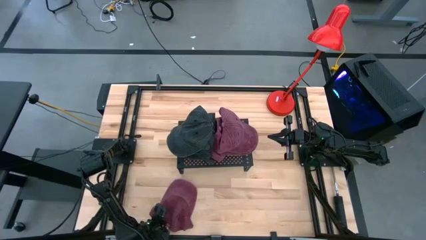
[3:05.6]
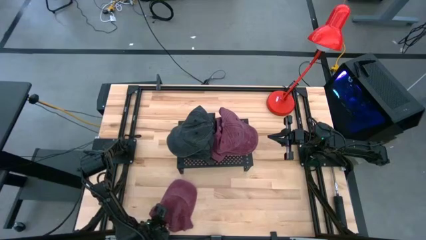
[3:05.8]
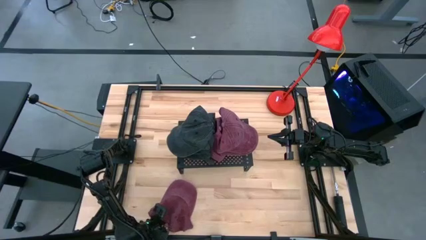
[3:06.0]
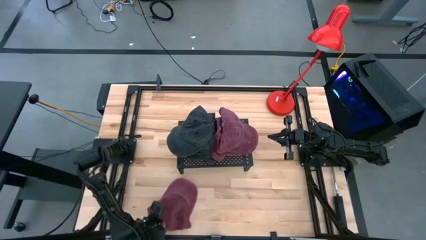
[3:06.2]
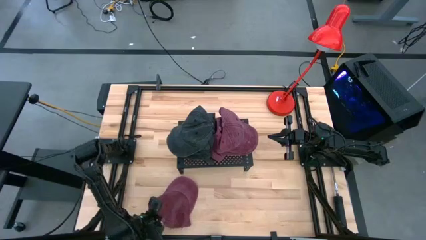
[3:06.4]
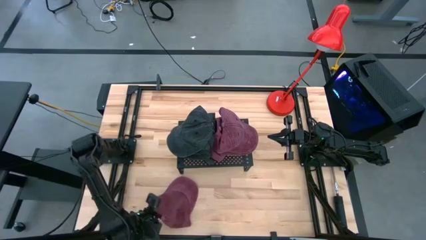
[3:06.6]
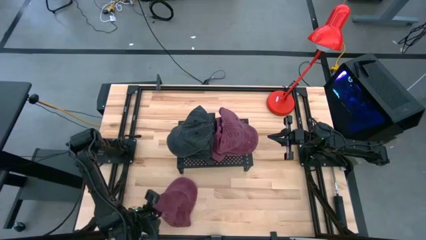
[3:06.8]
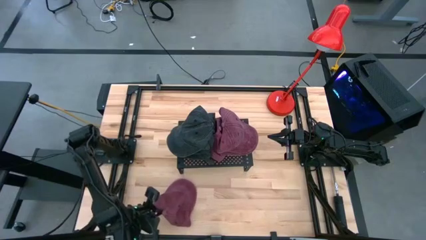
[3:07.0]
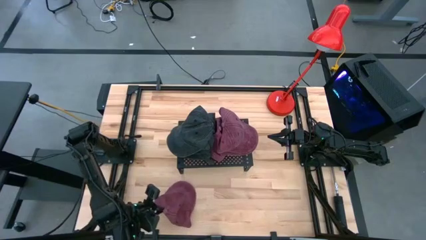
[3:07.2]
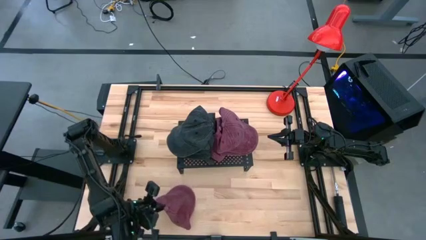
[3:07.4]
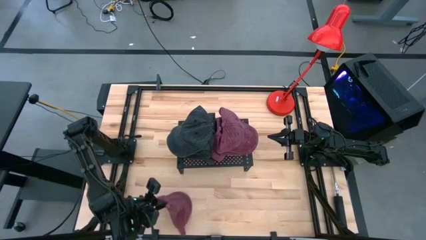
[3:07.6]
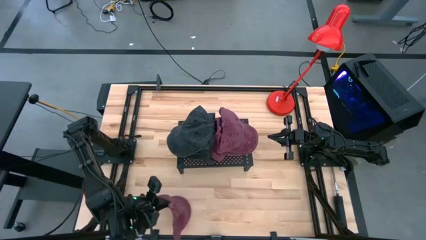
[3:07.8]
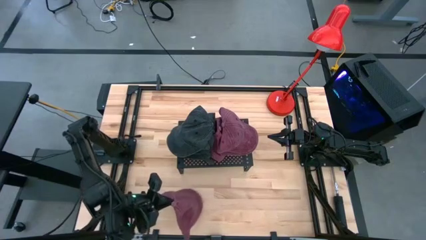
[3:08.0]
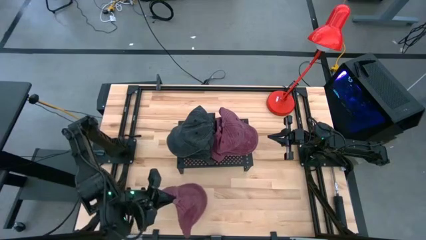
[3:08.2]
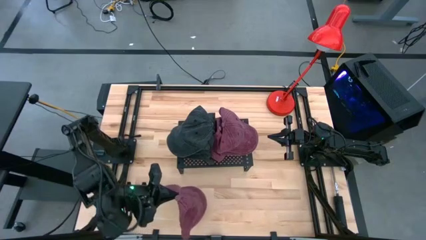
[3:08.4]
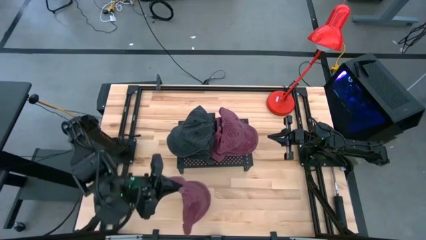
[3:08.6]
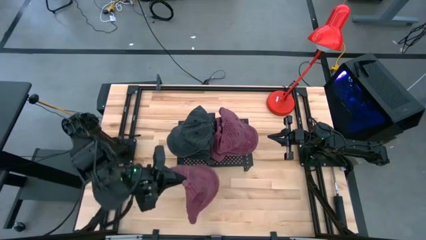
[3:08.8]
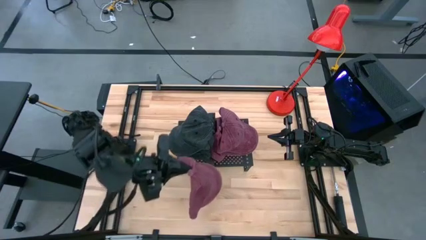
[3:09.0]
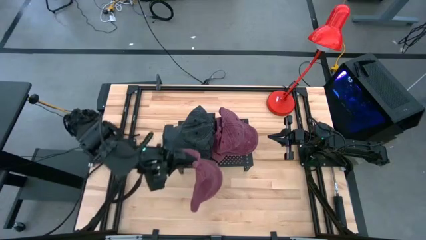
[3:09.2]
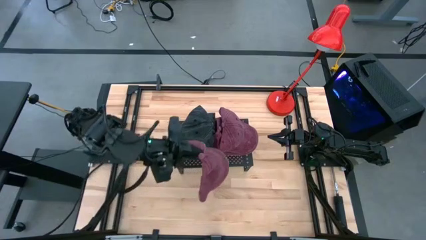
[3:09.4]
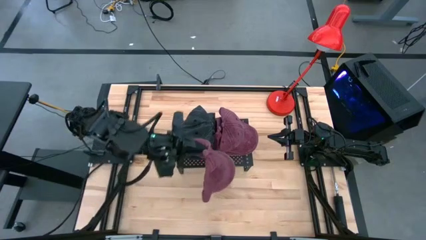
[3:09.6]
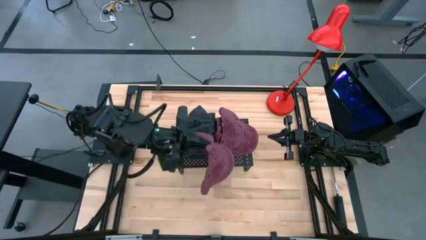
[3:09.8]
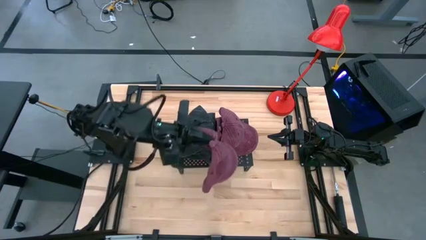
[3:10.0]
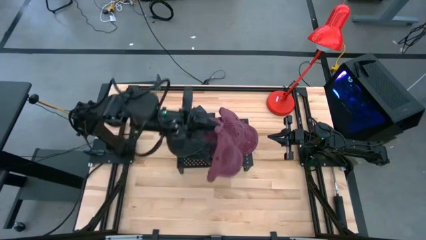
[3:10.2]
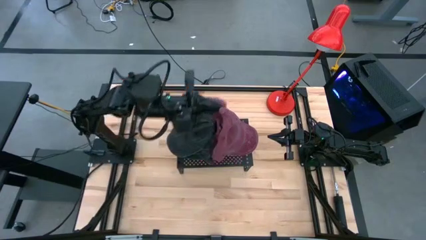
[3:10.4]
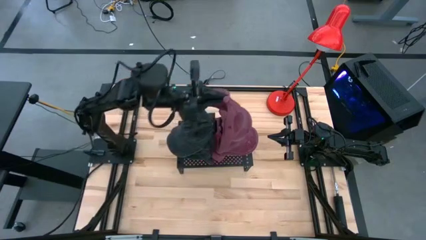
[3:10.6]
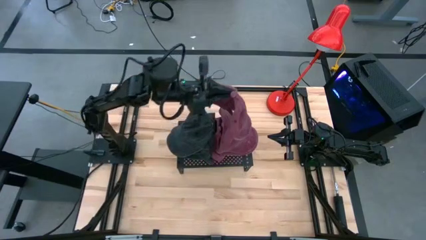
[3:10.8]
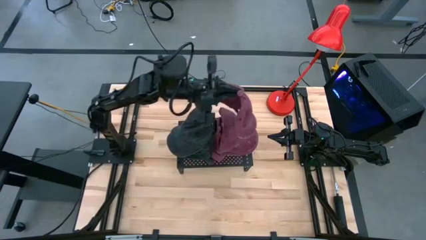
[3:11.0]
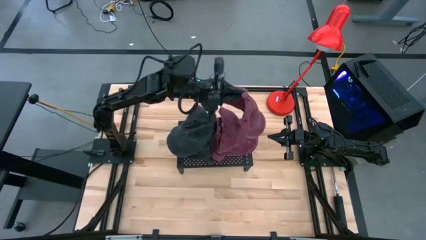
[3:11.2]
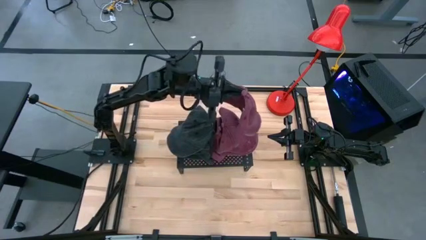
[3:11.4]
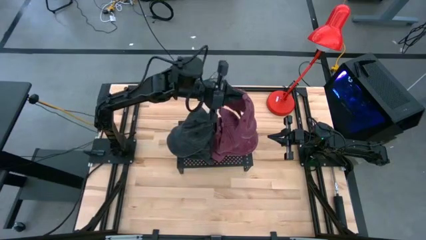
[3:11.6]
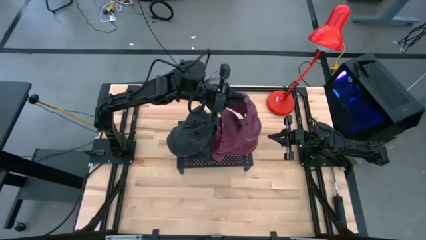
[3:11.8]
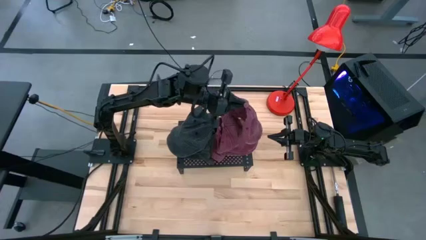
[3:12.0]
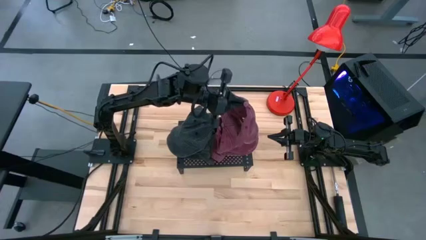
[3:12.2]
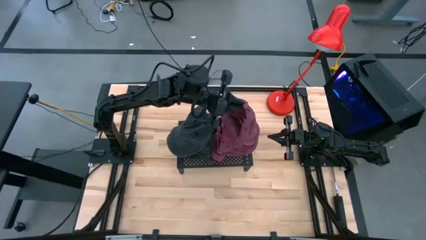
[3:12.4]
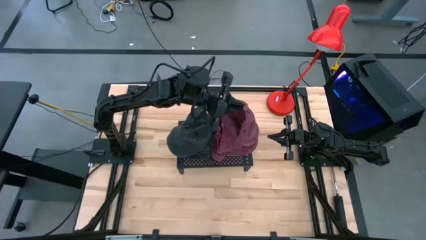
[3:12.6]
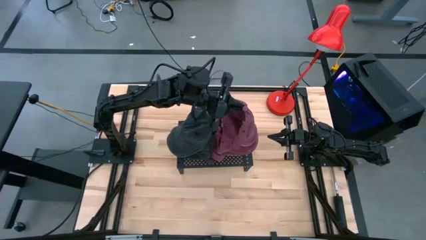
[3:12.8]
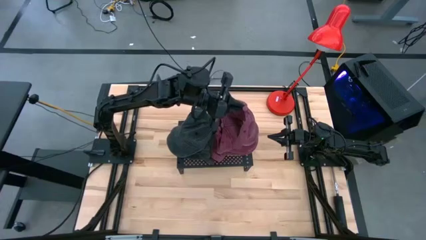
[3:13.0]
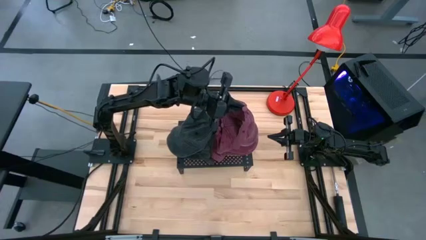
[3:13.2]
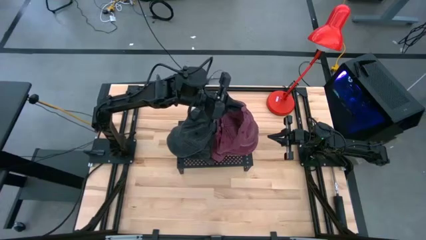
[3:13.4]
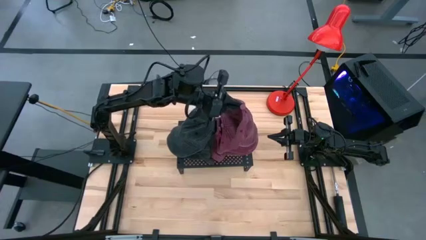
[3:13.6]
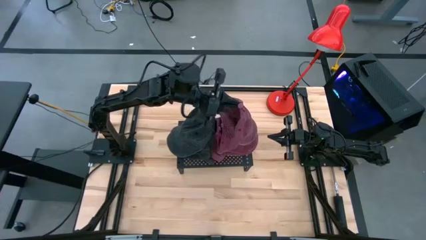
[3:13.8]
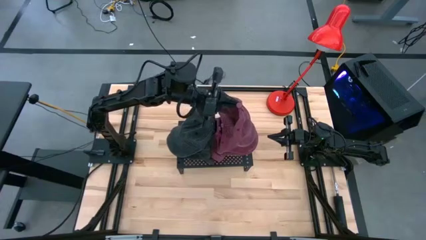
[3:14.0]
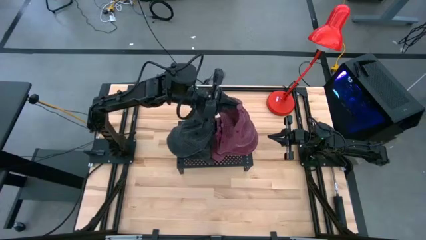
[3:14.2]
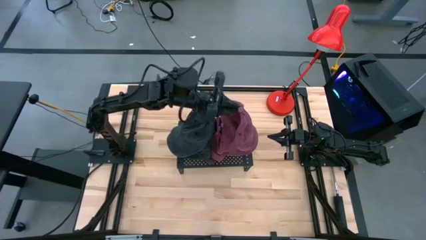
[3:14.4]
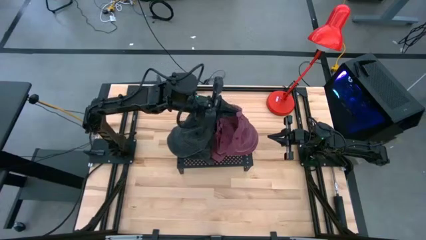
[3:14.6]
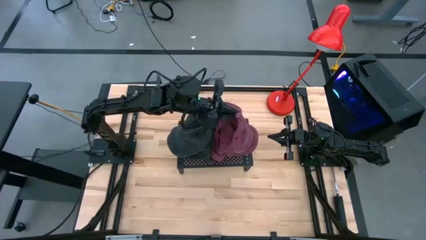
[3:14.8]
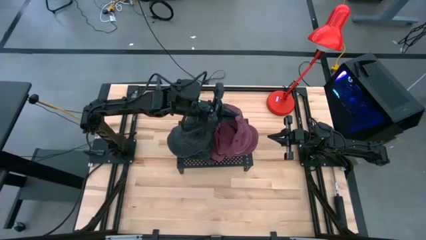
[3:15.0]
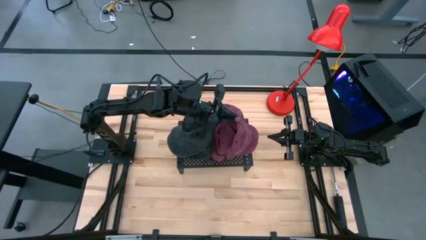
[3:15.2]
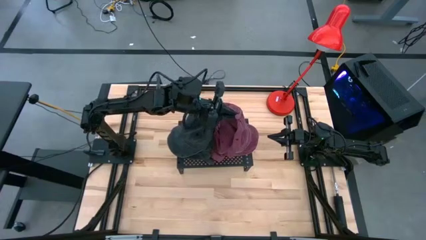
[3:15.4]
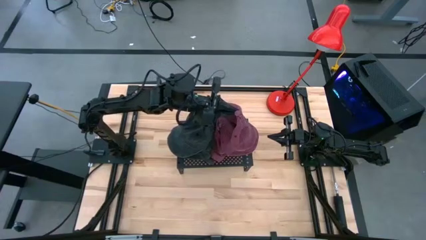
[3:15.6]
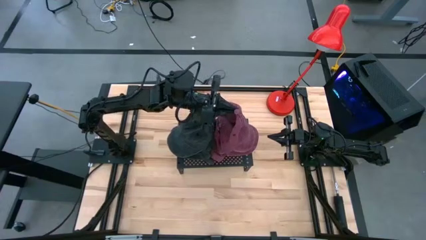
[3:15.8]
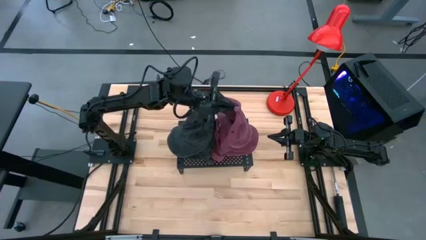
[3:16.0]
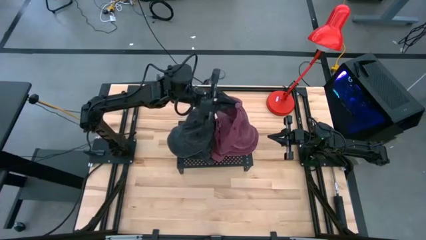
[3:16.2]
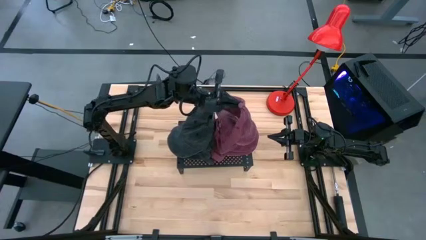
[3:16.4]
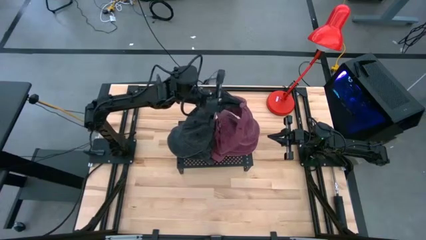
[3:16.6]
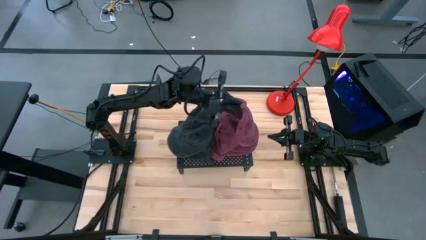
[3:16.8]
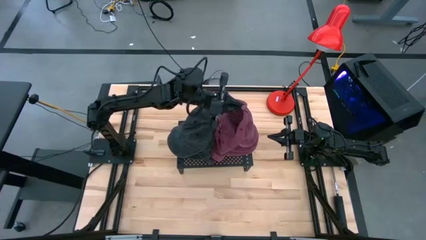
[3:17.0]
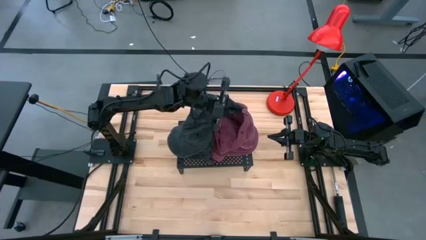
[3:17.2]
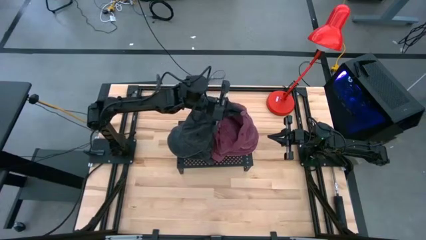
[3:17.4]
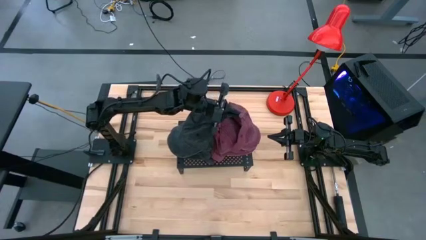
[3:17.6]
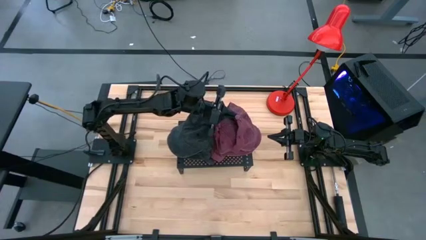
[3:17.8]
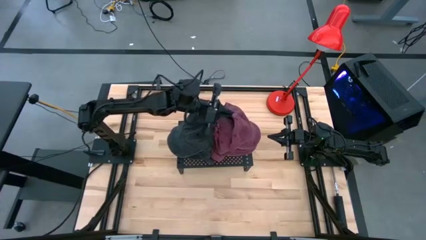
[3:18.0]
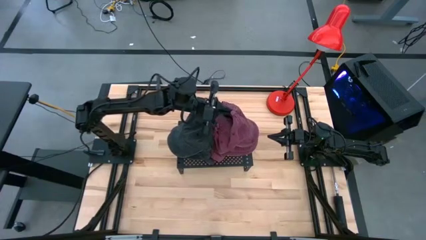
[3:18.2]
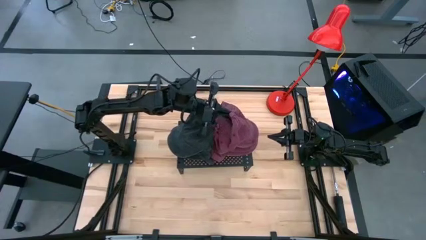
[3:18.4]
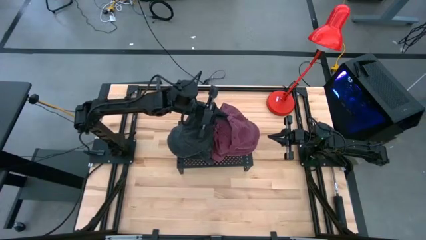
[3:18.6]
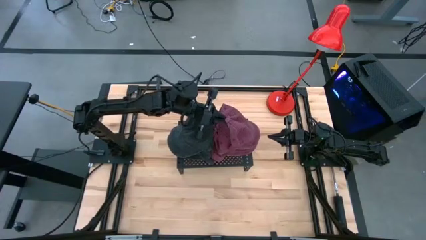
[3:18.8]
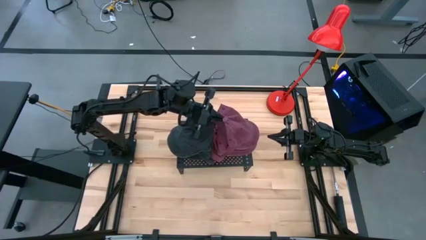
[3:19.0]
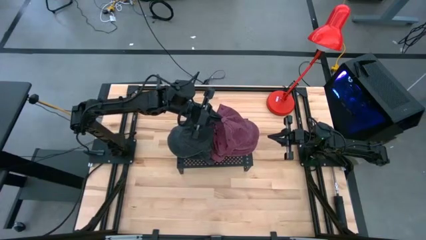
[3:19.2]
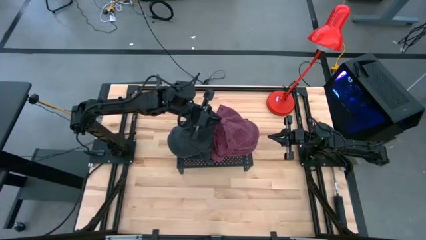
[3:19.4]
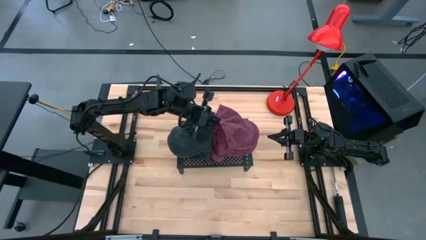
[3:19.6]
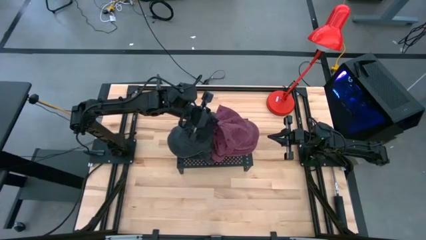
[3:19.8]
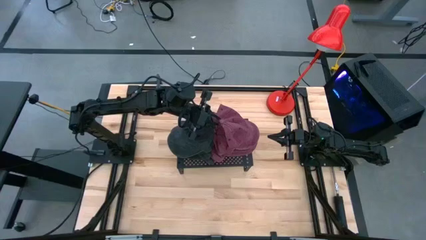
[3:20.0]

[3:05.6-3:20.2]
Task: Pick & Place hat
Stack the red cap on top of the red cap on the shelf

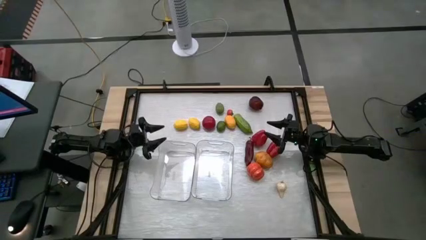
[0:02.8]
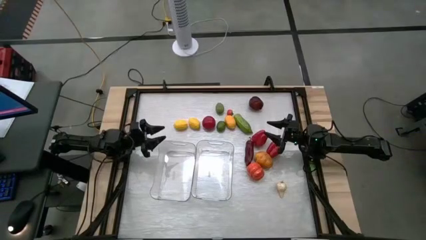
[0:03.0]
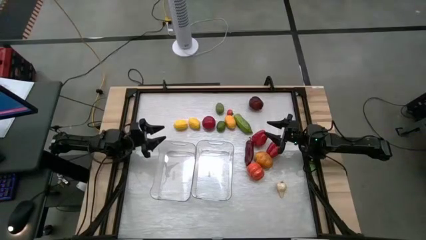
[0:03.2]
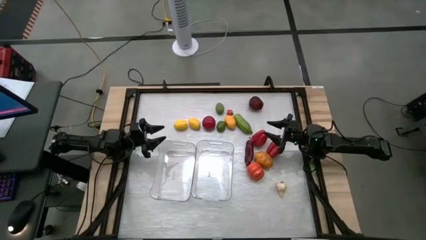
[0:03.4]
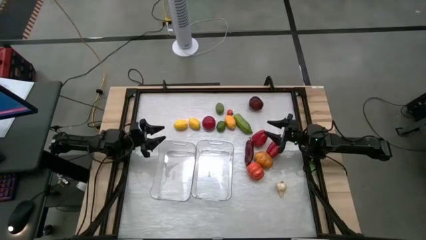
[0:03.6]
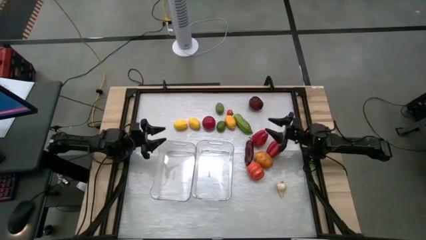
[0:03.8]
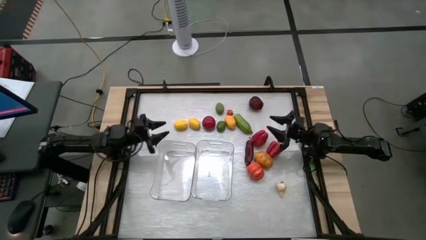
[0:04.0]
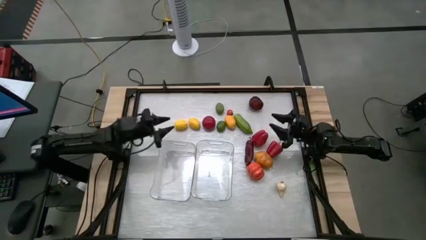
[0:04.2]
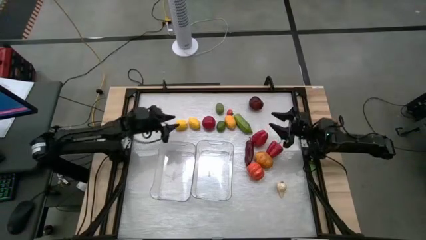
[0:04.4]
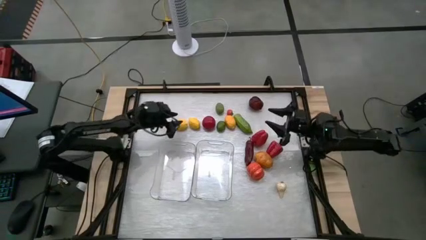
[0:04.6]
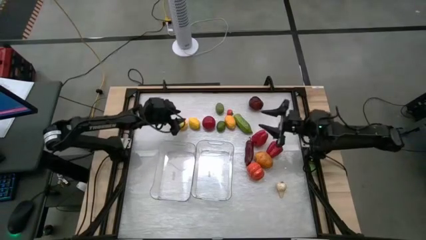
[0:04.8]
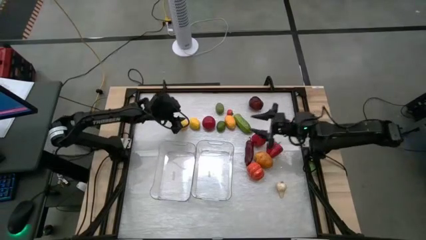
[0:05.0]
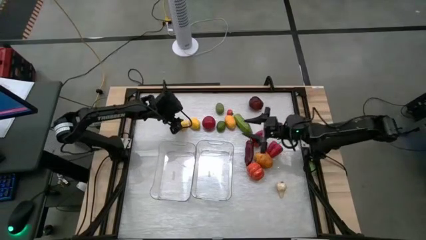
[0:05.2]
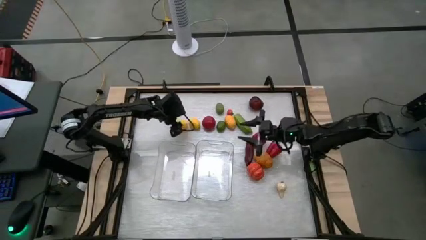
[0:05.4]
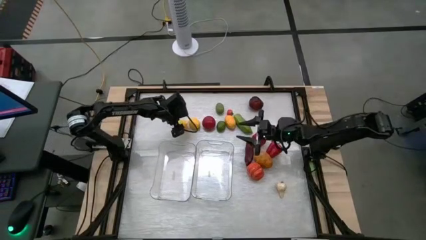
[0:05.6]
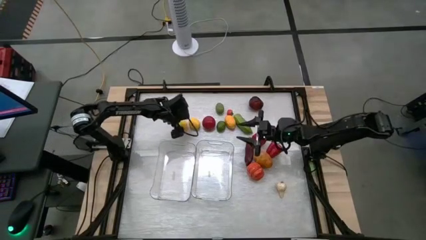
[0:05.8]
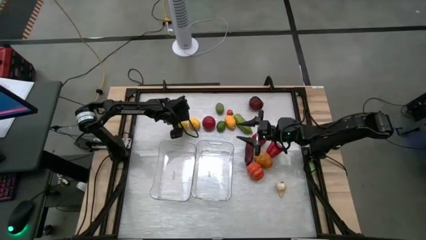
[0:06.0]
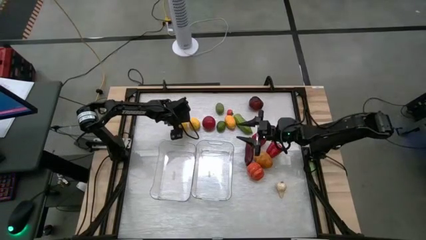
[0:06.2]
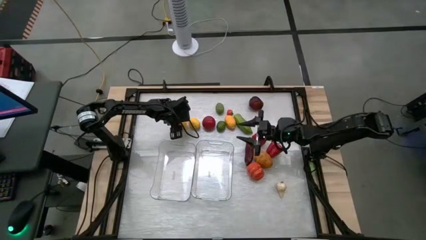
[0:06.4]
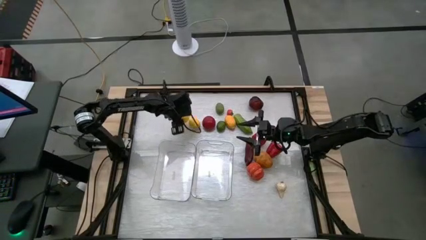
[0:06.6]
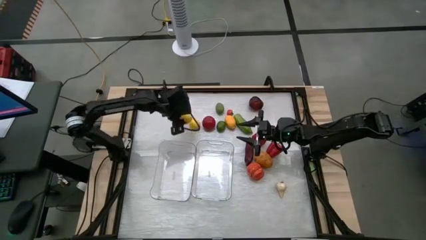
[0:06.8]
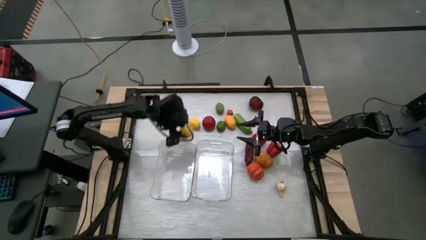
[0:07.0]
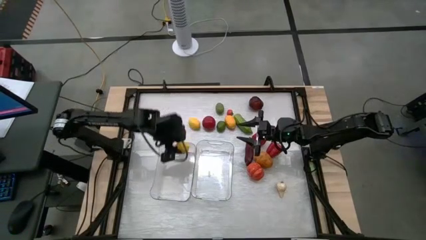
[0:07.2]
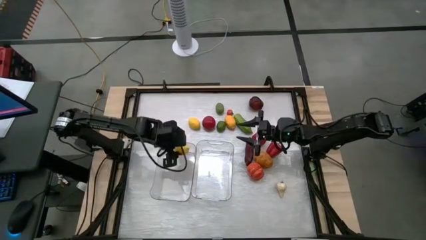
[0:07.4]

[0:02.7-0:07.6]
Task: Sort produce into baskets
Put the left lemon into the left transparent bin
